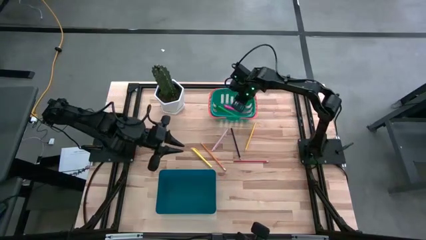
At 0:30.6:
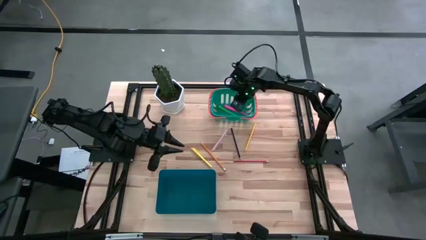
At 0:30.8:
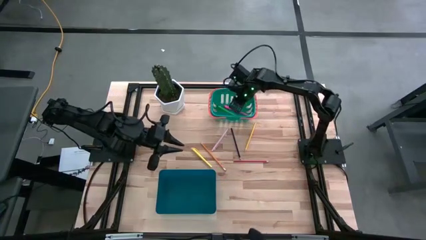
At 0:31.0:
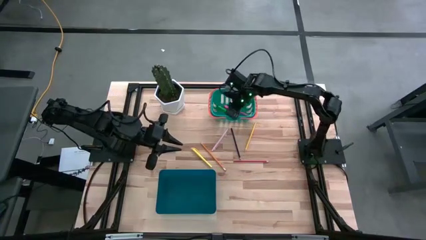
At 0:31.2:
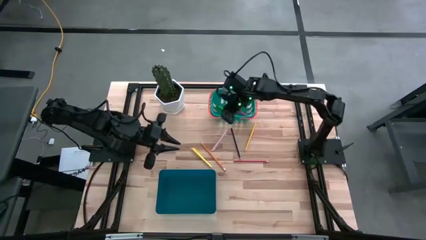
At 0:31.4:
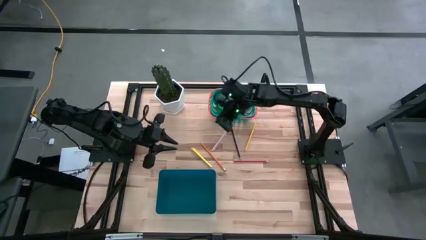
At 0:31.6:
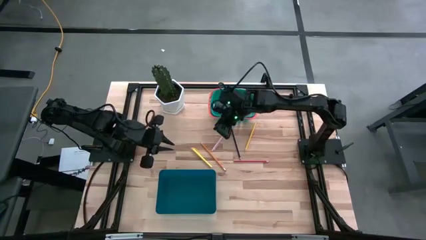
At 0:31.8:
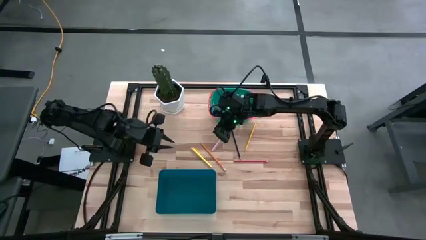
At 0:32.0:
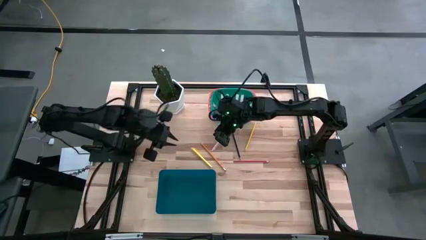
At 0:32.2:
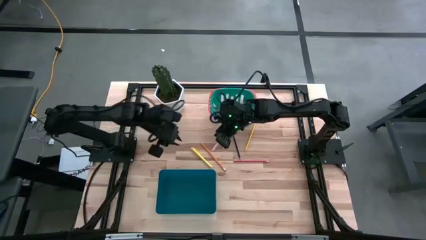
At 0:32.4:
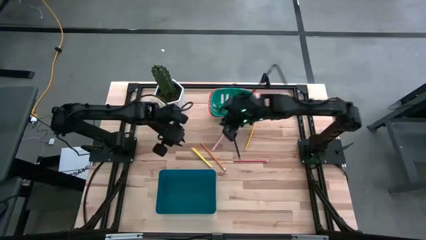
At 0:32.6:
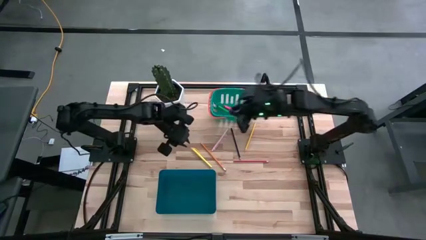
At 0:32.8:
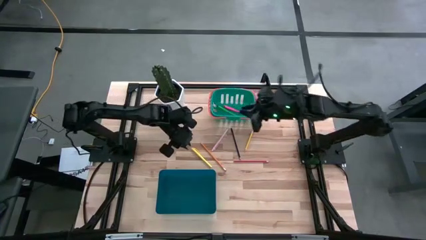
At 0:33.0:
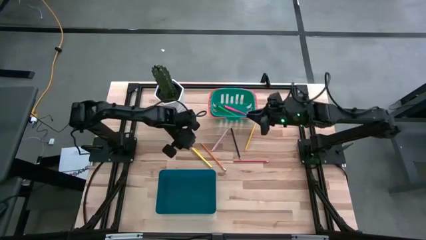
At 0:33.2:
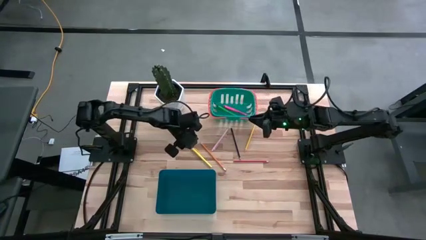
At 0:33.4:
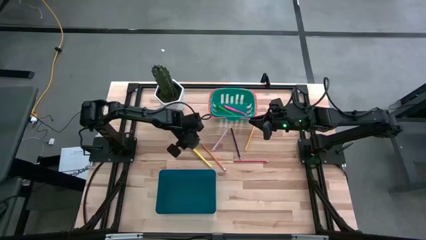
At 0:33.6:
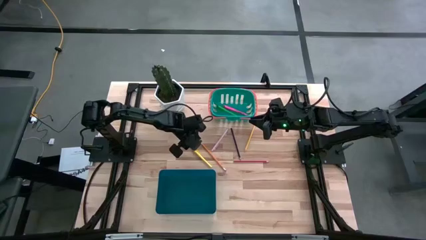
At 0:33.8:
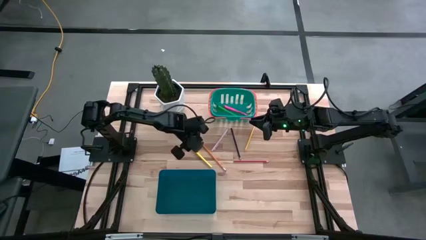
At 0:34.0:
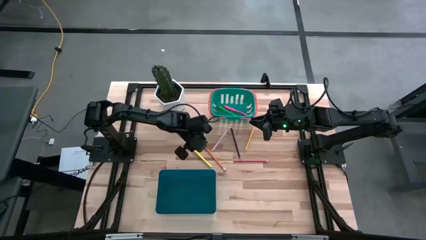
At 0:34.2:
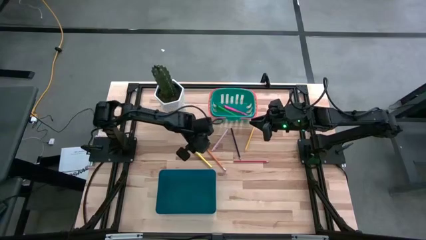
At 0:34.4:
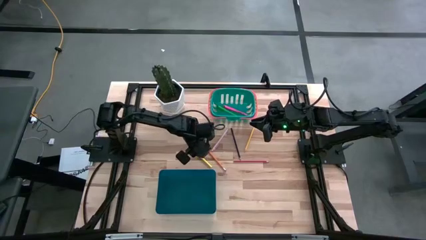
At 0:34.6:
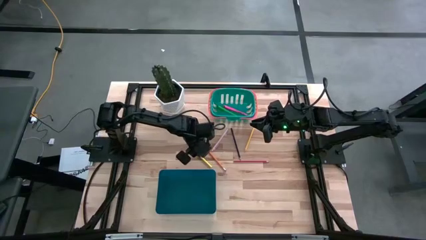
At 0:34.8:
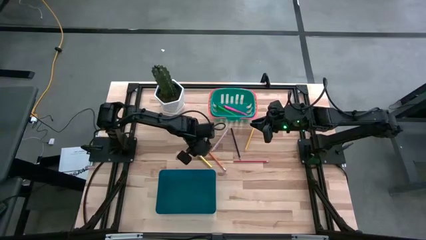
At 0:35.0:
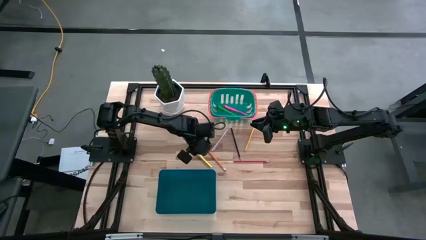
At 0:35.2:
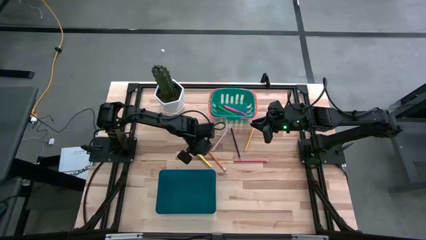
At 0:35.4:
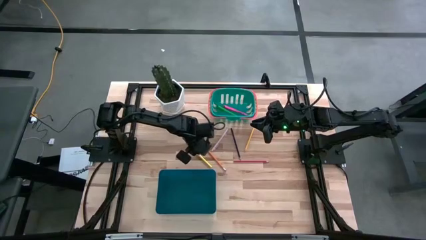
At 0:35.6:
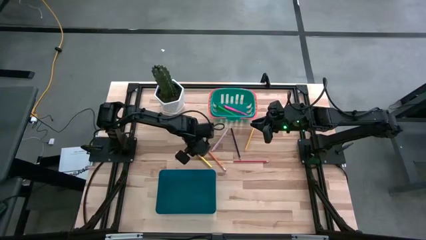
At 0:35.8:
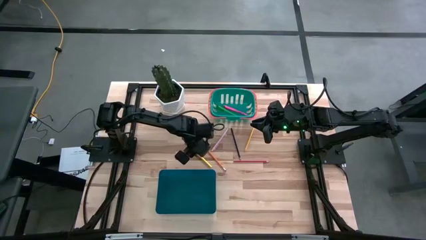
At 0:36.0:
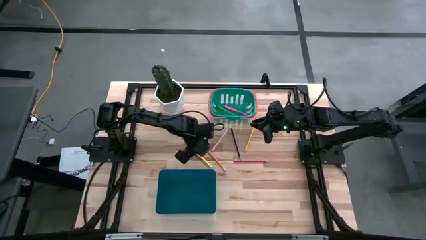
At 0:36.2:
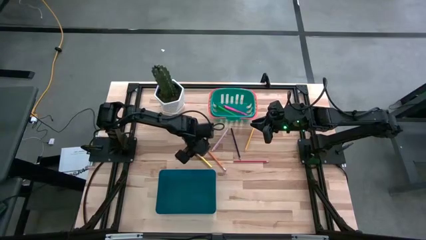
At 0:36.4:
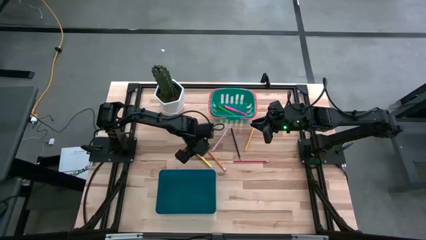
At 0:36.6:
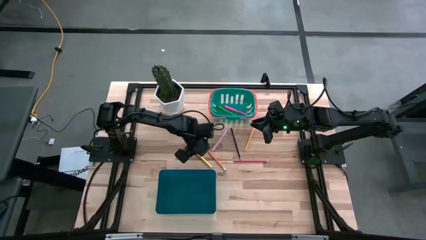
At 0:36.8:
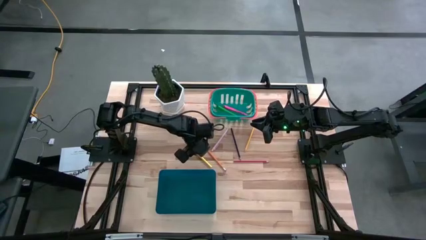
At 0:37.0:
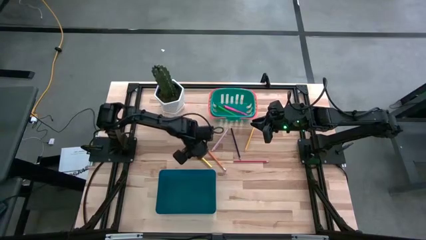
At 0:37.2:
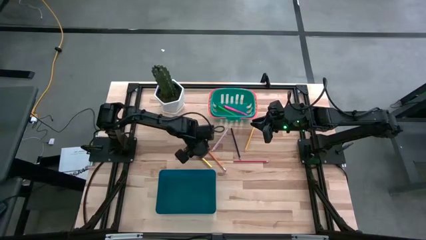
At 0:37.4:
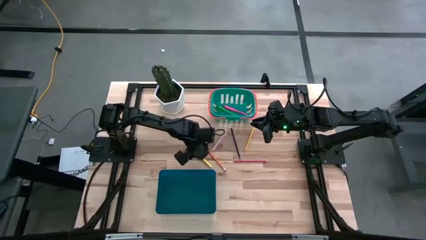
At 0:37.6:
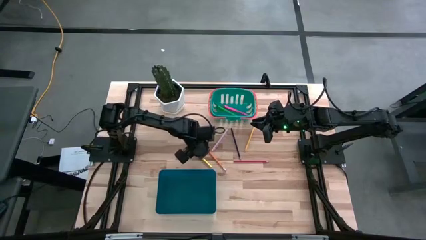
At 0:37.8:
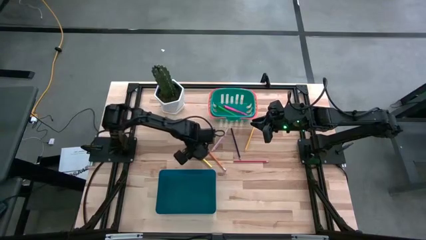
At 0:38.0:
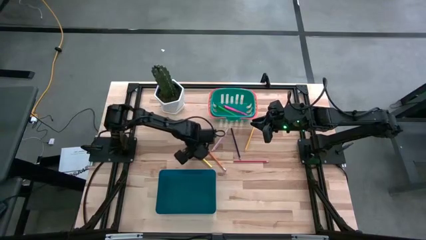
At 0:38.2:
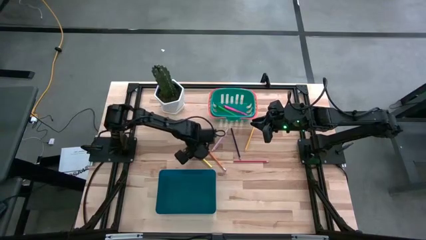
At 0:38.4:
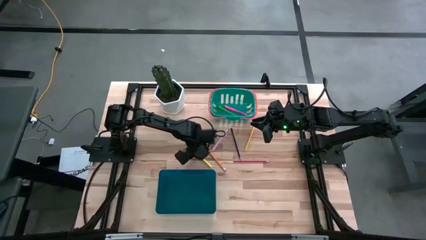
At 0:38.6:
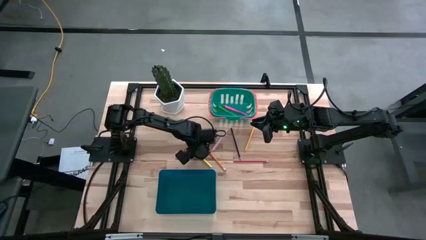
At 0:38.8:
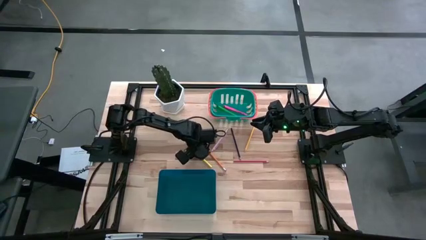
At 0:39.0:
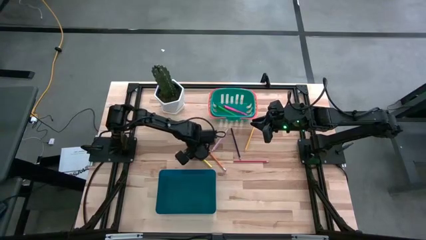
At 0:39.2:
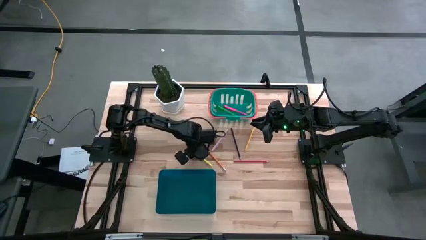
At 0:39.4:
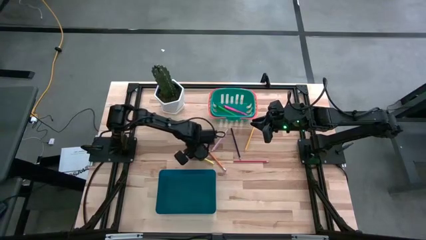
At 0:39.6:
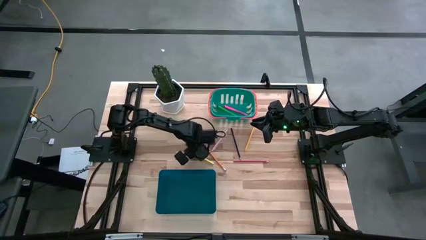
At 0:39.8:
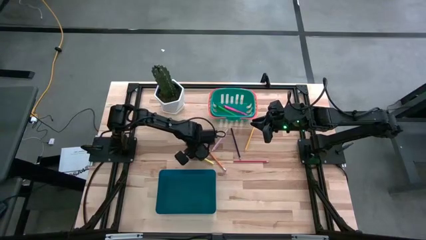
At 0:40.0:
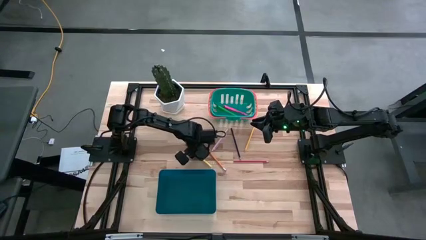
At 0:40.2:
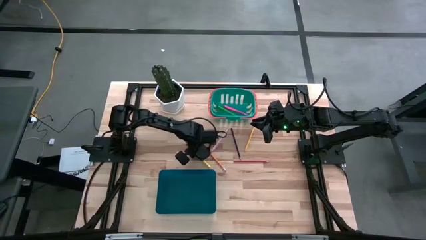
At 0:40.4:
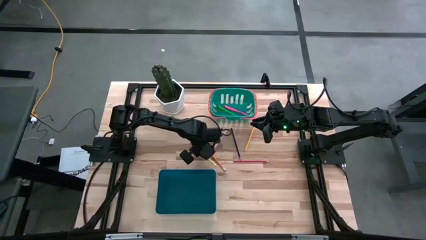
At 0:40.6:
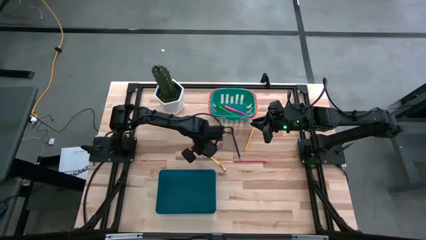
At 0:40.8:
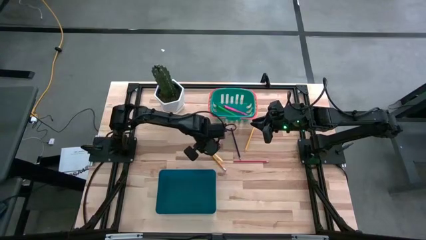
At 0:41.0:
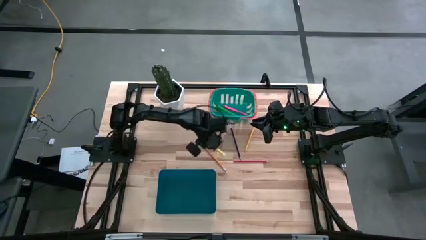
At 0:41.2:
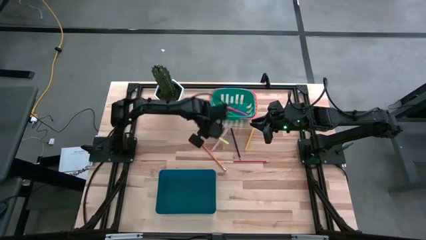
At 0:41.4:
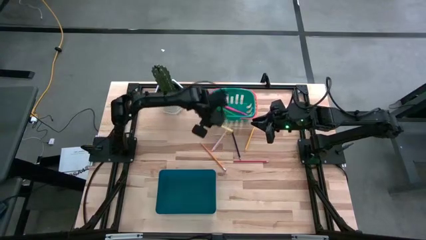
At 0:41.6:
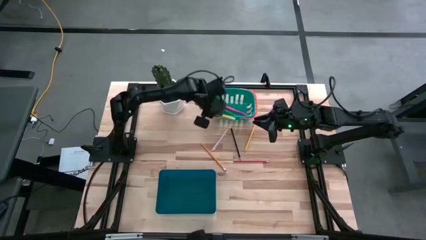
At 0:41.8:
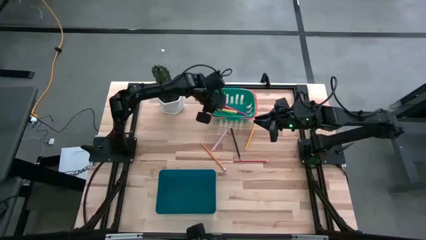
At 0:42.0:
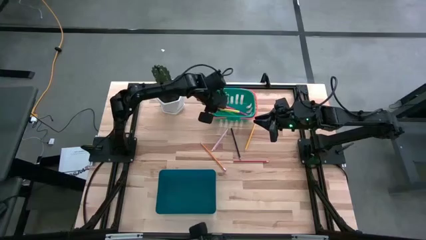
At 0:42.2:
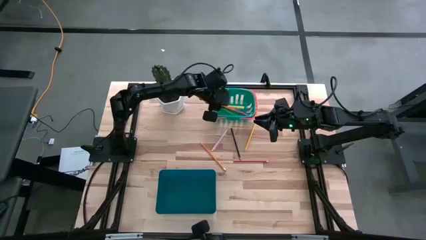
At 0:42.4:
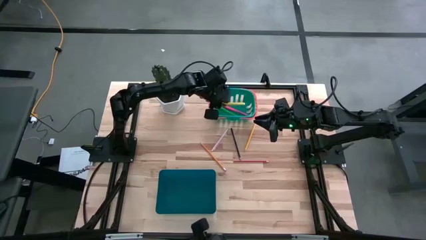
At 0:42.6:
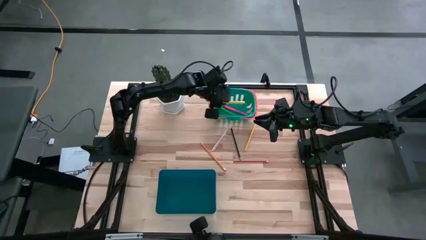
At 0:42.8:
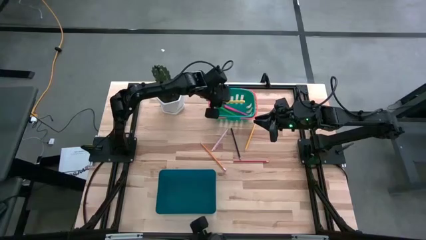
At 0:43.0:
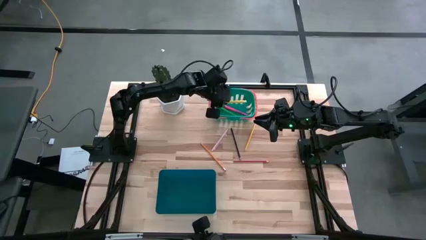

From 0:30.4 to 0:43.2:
Task: Sort pens & pencils
Put the yellow pen into the green basket
